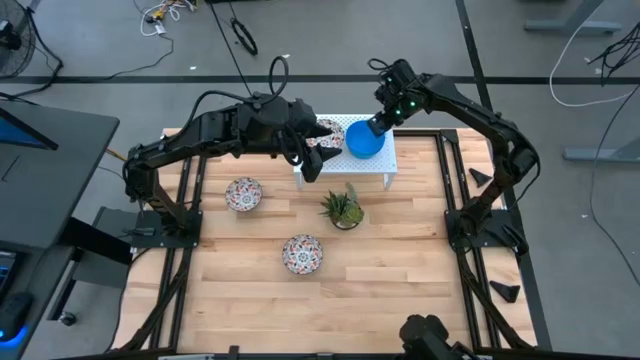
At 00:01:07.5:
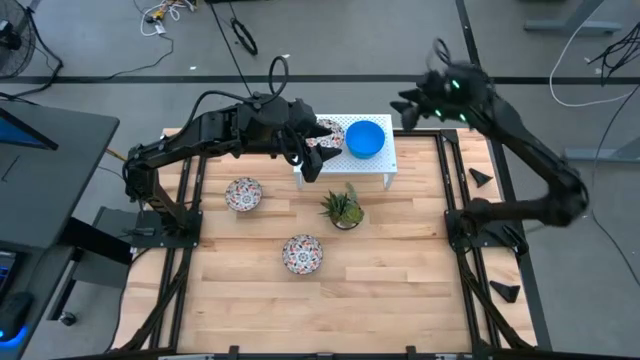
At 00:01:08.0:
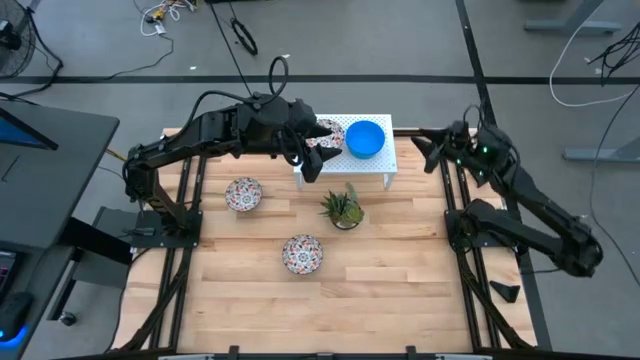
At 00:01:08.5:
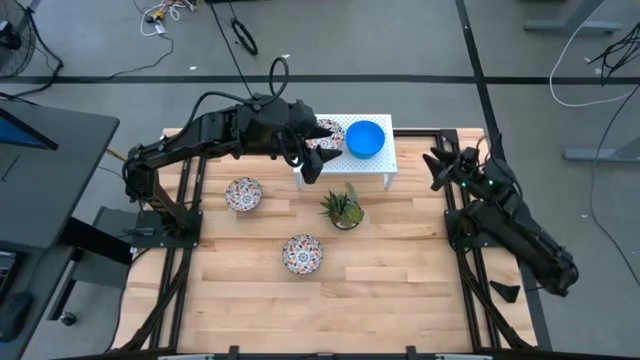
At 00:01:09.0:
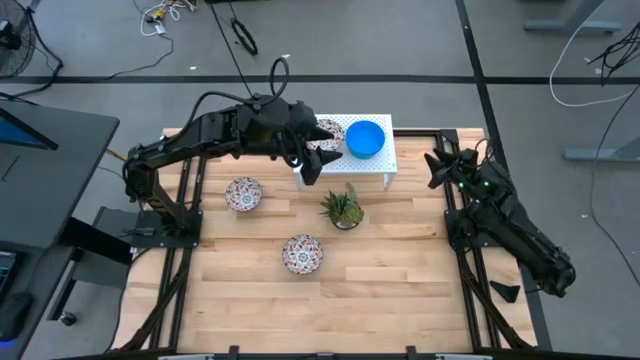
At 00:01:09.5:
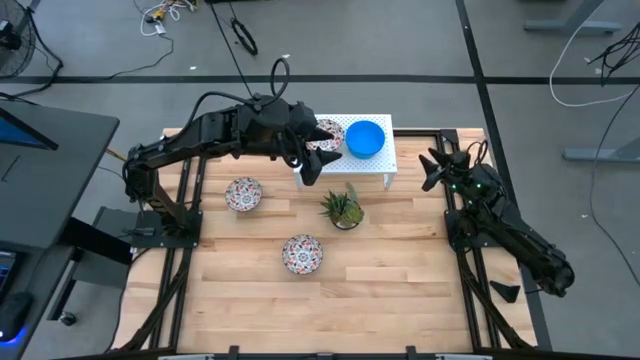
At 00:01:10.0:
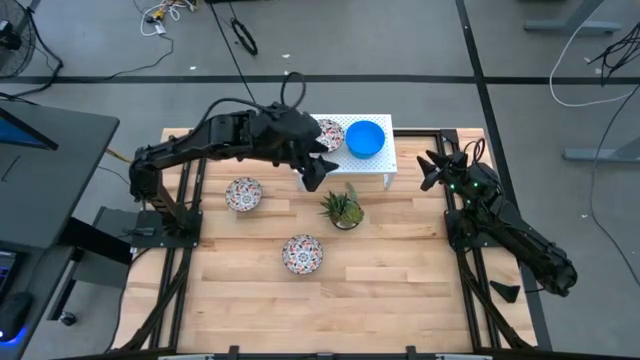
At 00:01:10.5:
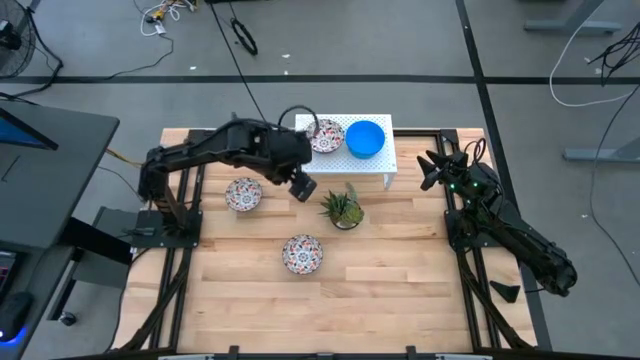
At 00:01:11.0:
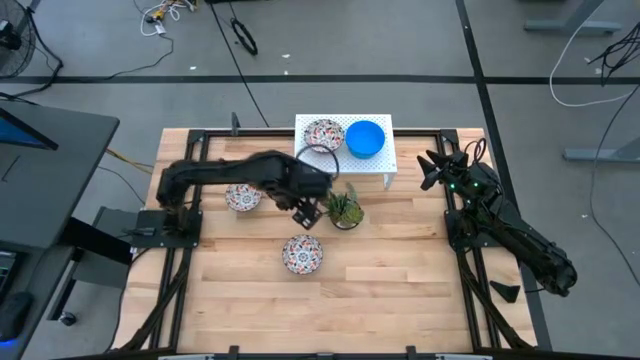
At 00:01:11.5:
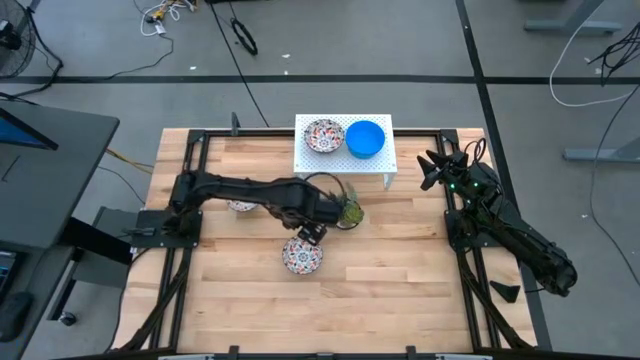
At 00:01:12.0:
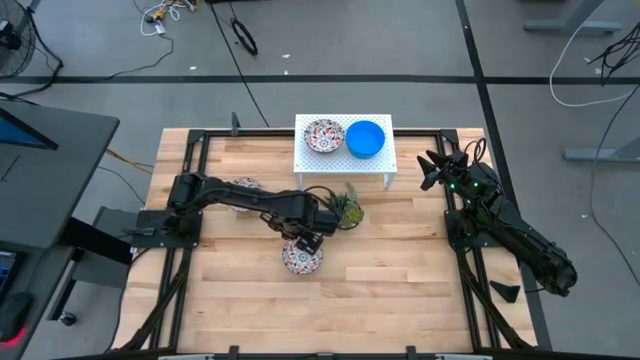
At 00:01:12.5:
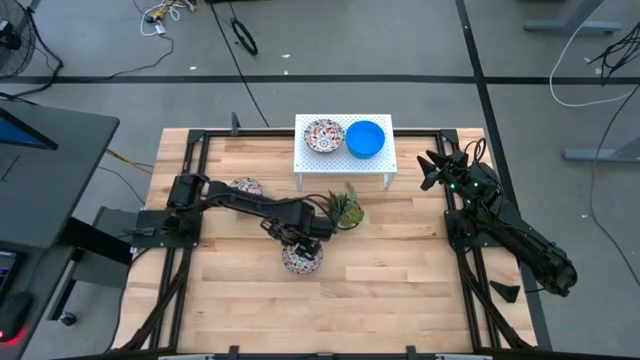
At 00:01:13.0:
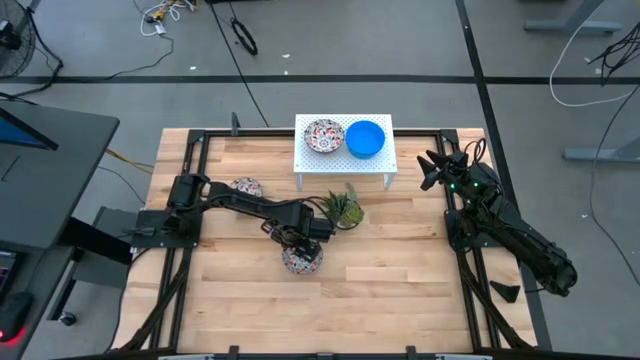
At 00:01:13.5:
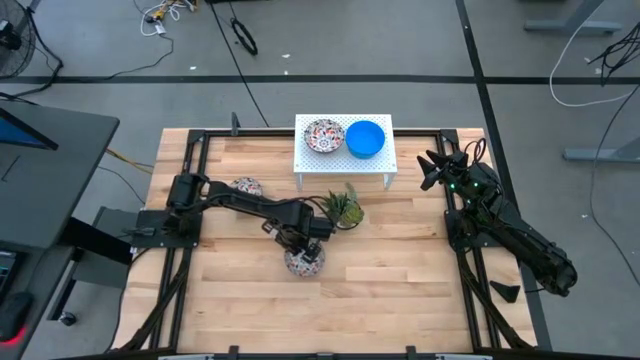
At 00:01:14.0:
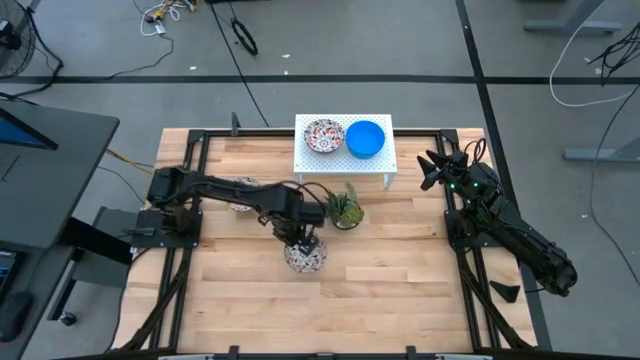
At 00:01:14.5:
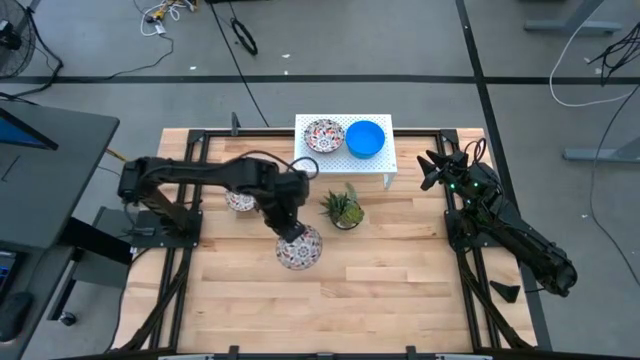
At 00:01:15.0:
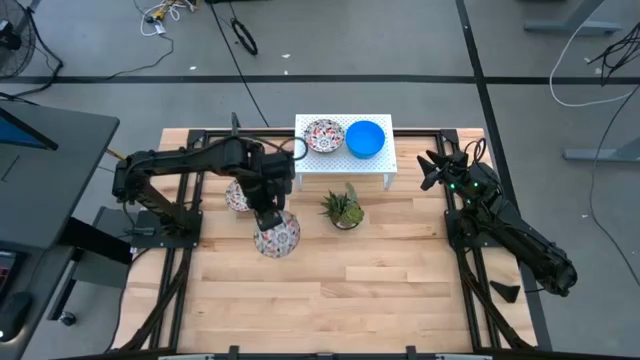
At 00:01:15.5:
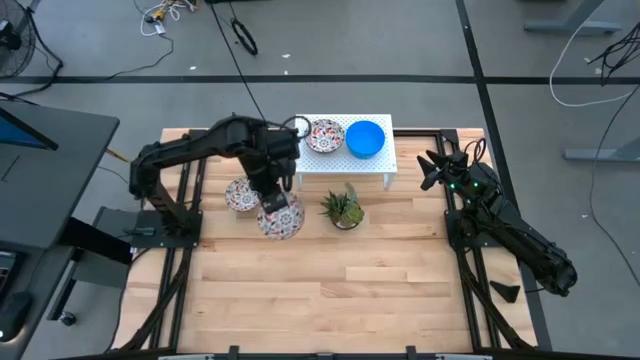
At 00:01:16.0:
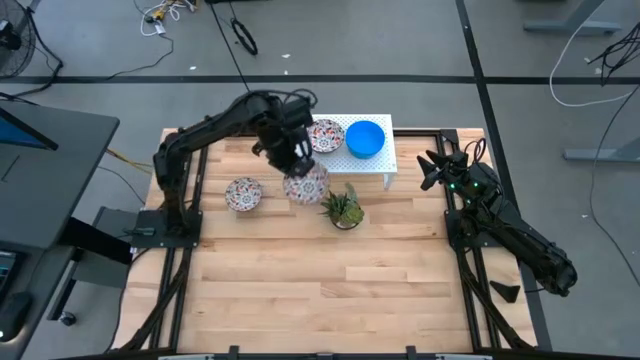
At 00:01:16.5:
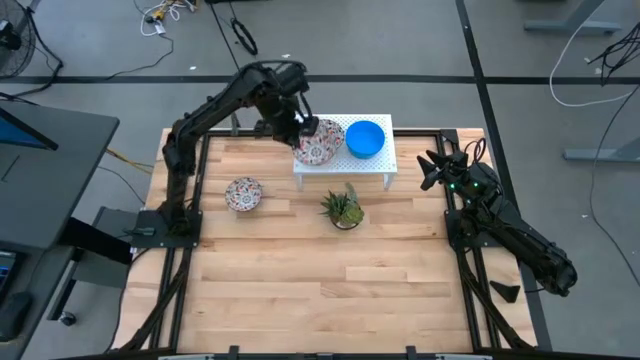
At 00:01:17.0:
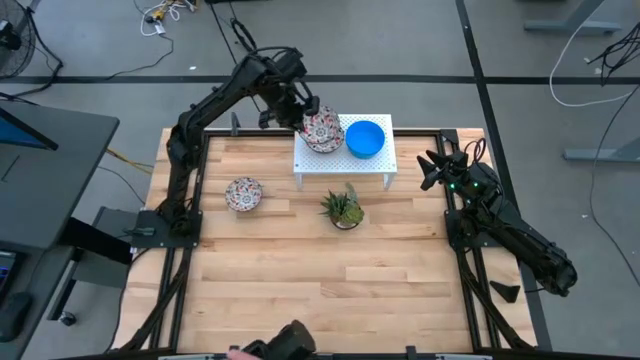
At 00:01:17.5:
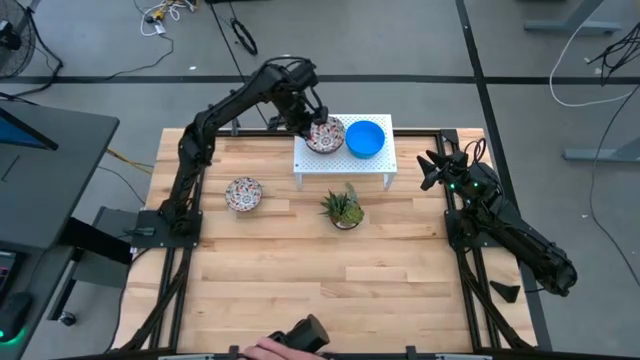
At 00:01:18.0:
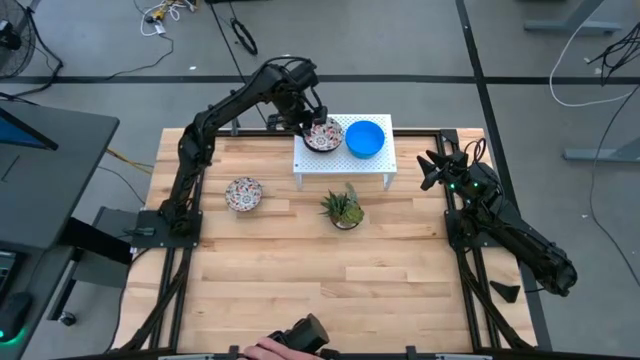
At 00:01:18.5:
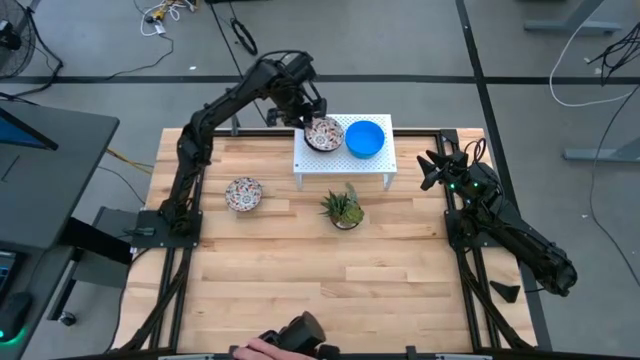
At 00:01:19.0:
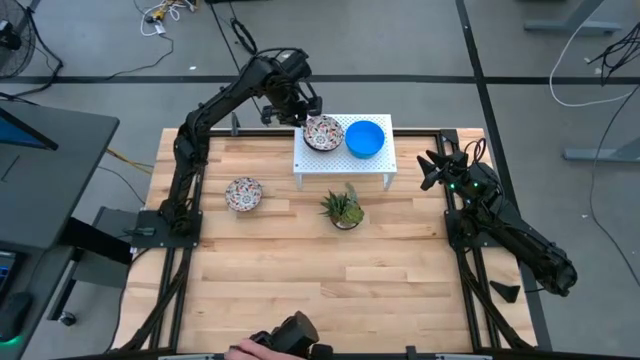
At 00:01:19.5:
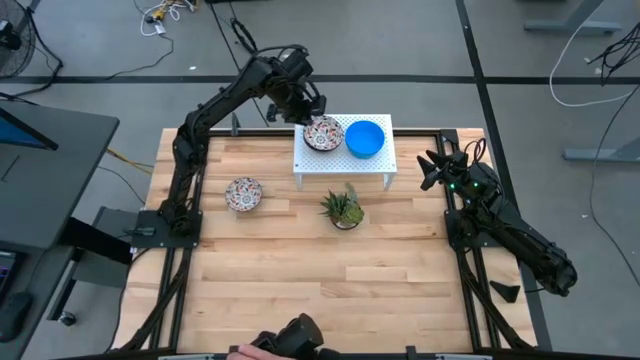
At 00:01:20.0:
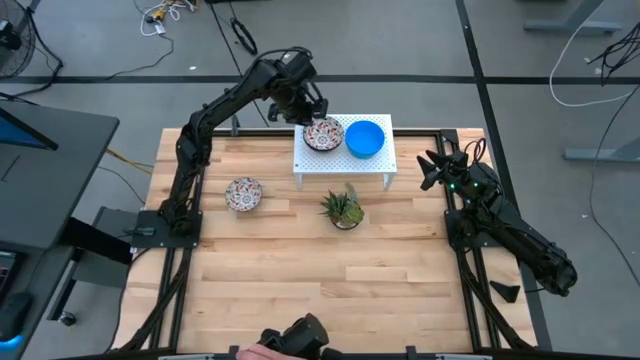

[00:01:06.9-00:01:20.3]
Task: Pick & Place Mini bowls
Stack the bottom white patterned bowl on the white patterned bowl on the shelf

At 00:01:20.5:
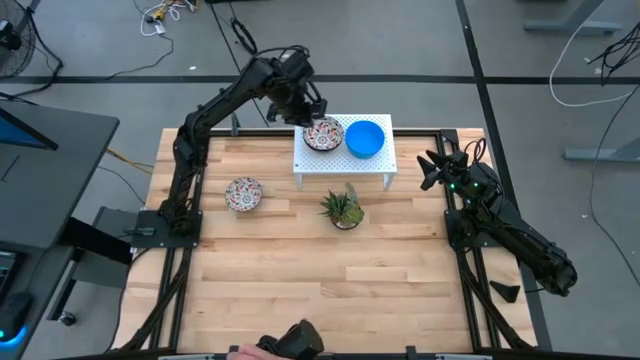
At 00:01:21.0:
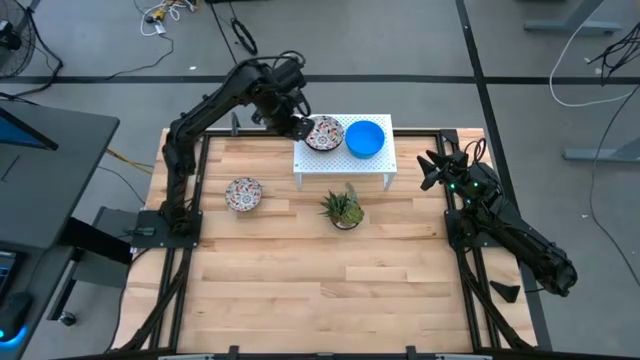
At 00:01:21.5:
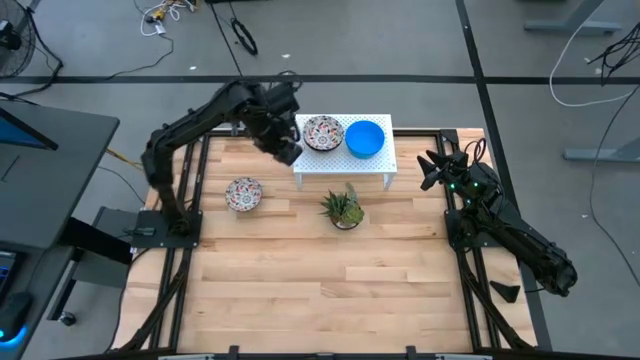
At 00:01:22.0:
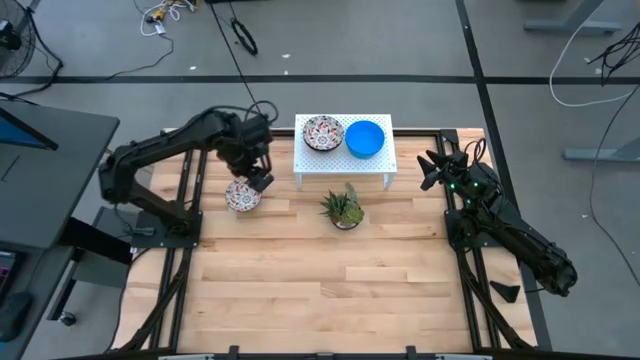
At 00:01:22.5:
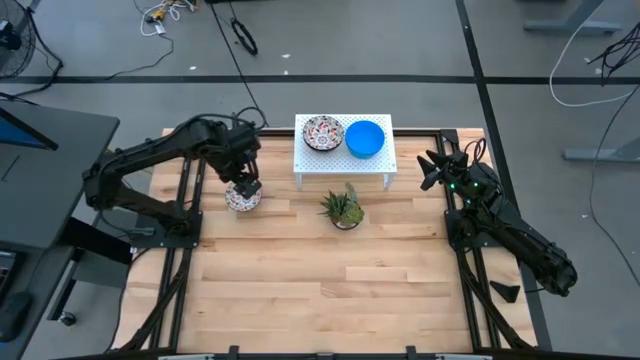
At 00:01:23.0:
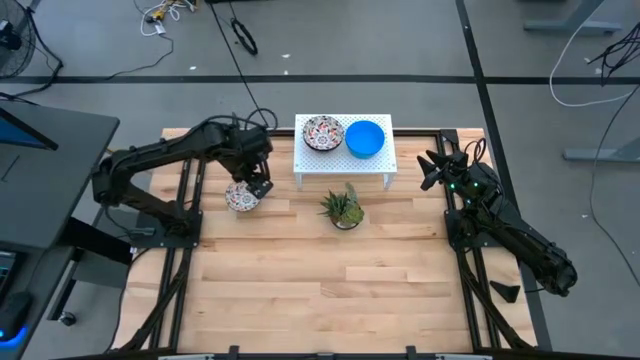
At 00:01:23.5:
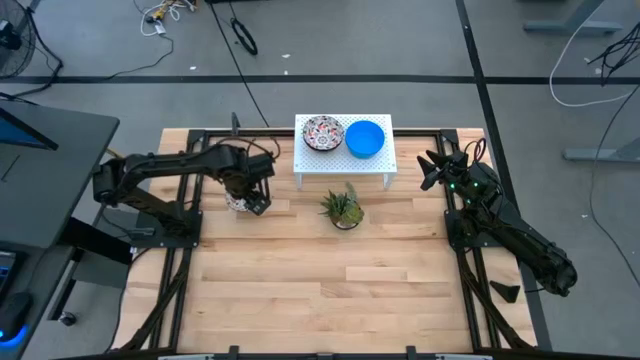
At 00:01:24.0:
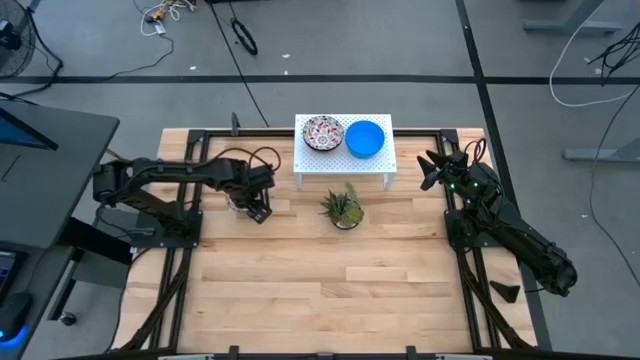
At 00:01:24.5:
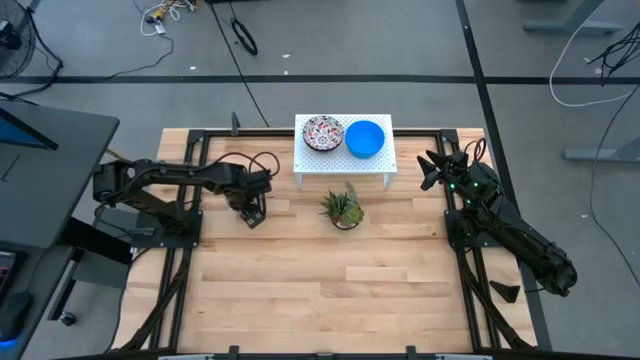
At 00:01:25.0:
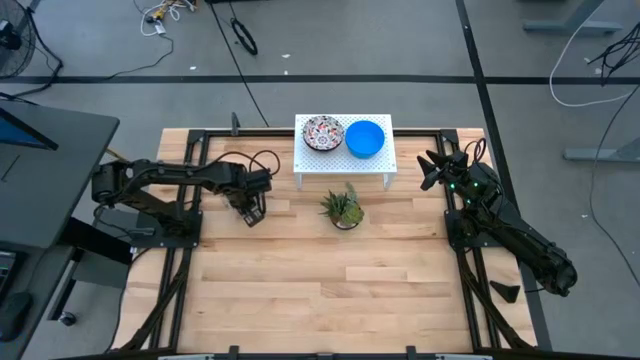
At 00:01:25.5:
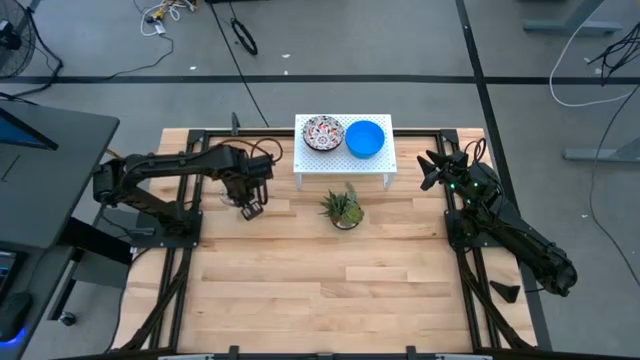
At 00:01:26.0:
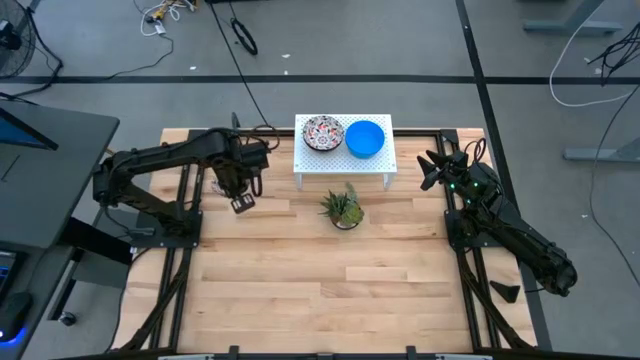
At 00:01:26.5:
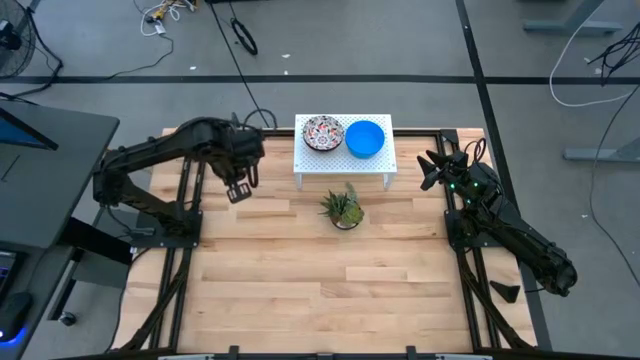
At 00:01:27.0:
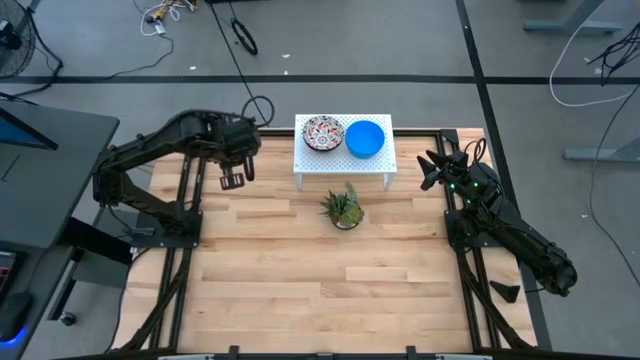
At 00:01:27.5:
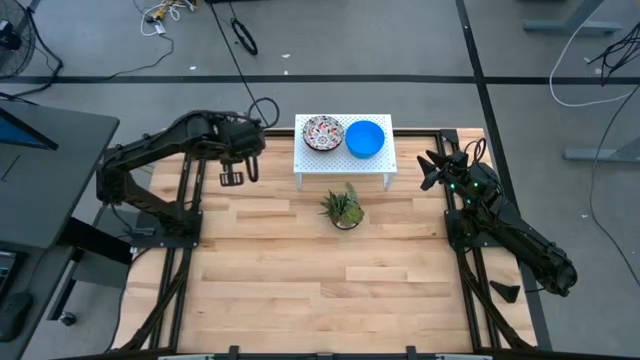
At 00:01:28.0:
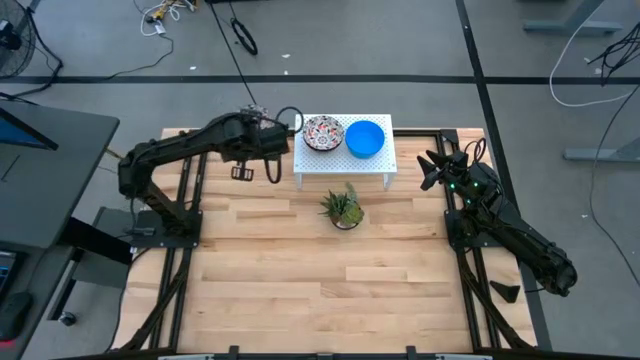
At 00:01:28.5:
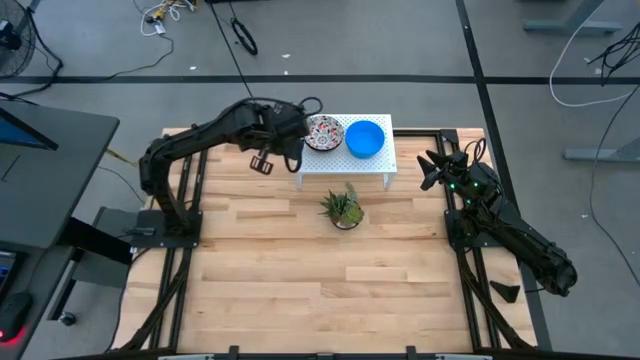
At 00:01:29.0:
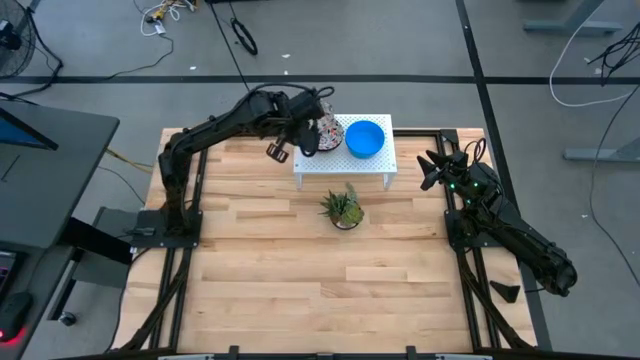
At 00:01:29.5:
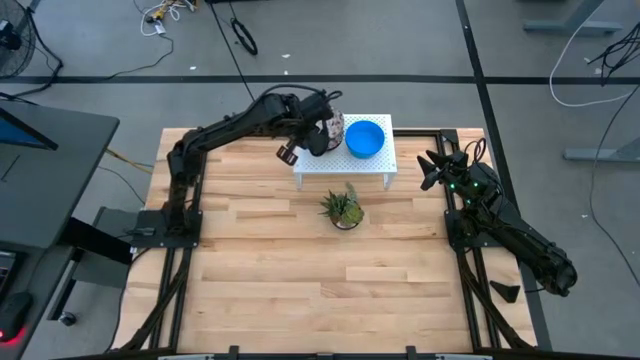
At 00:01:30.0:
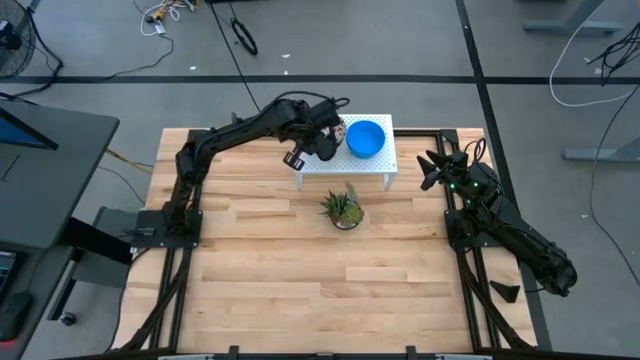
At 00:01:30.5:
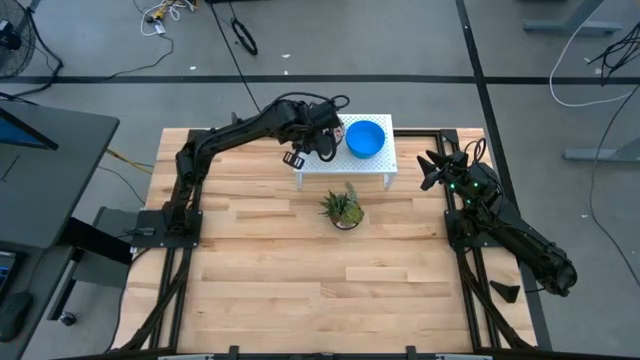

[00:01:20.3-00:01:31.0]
Stack the white patterned bowl on the white patterned bowl on the shelf
